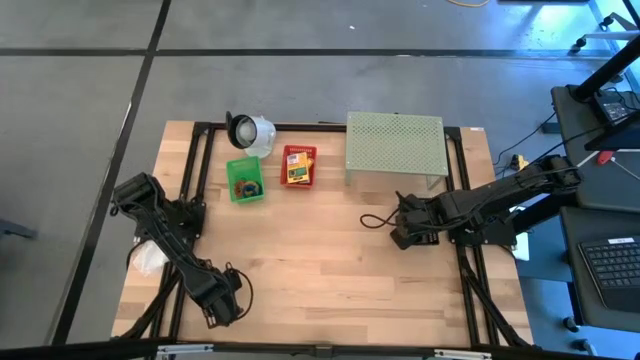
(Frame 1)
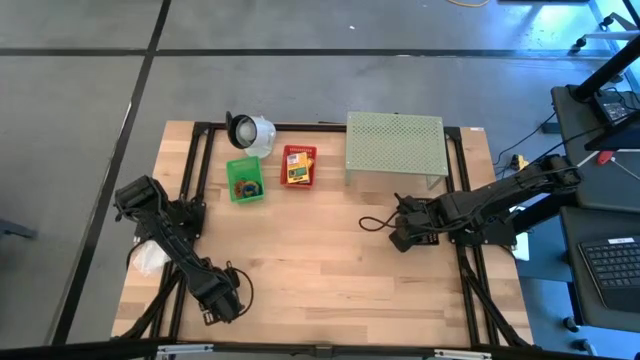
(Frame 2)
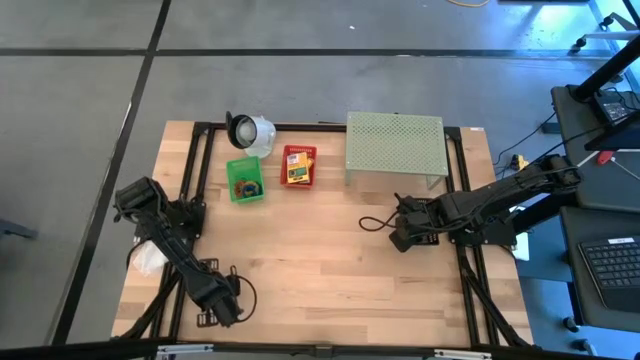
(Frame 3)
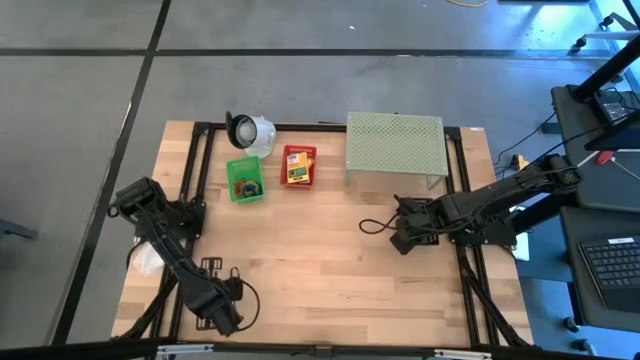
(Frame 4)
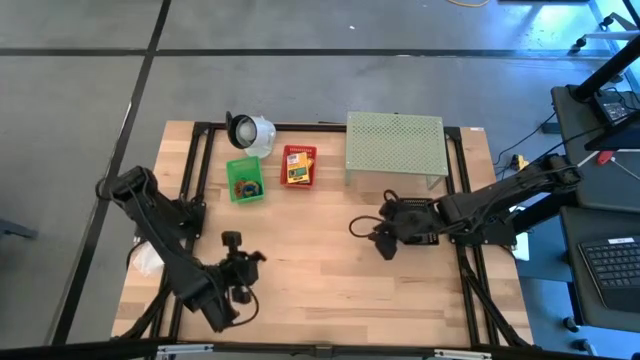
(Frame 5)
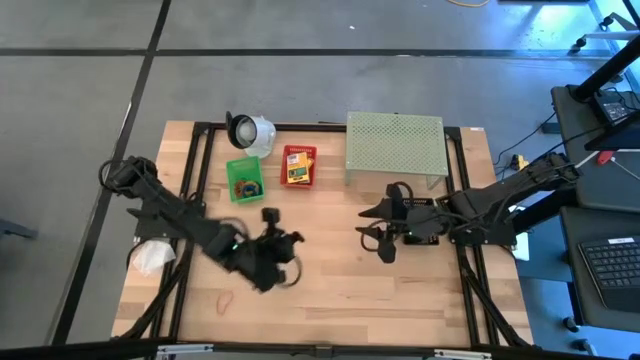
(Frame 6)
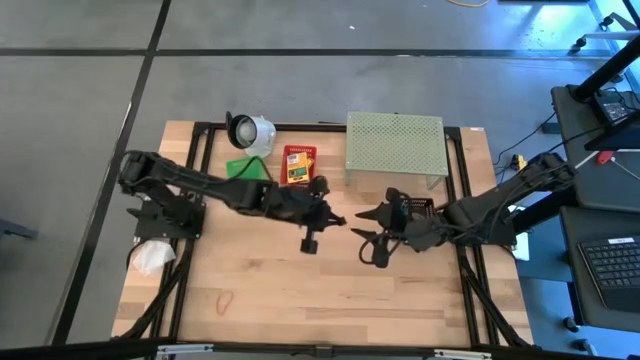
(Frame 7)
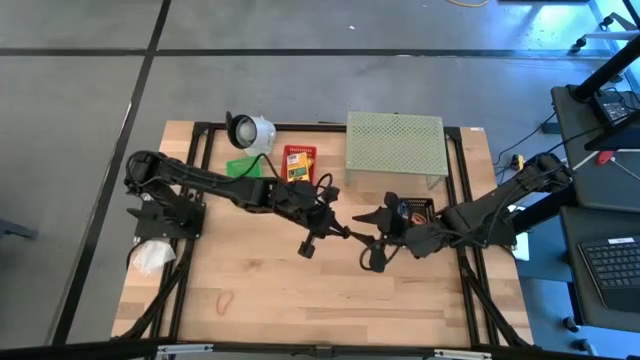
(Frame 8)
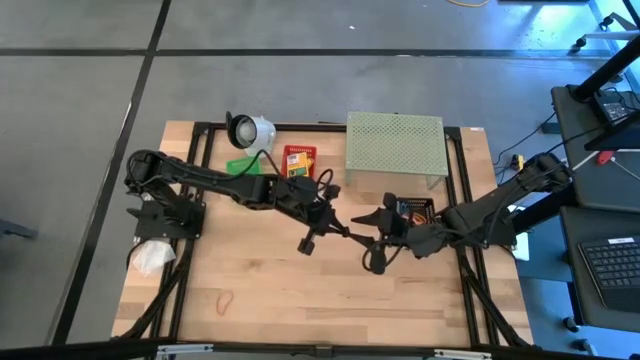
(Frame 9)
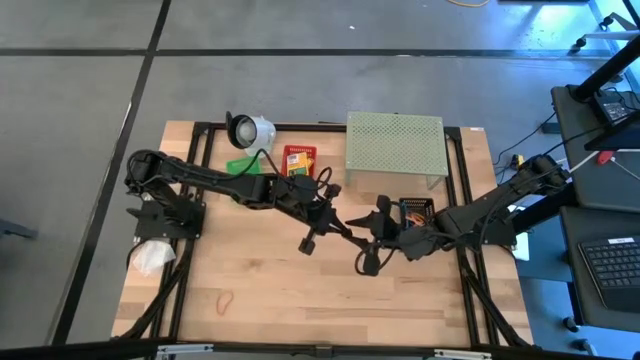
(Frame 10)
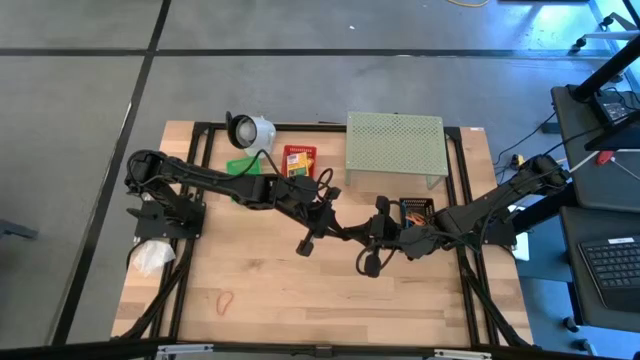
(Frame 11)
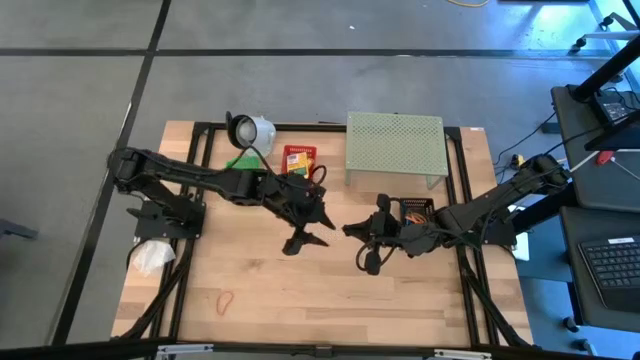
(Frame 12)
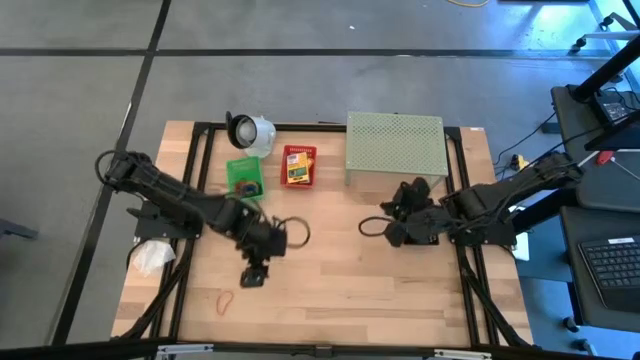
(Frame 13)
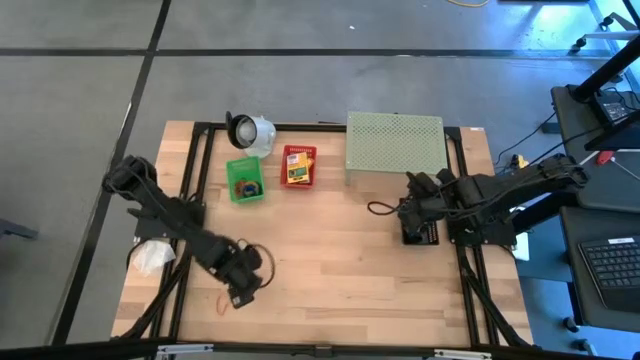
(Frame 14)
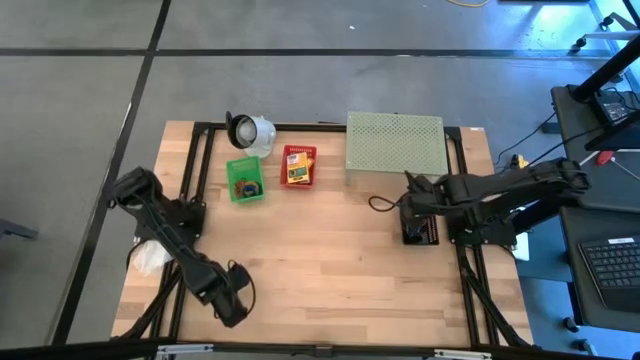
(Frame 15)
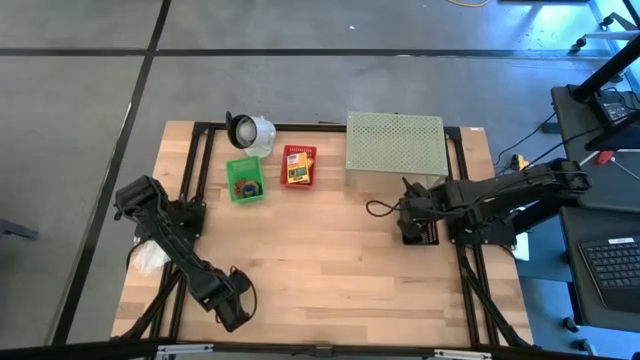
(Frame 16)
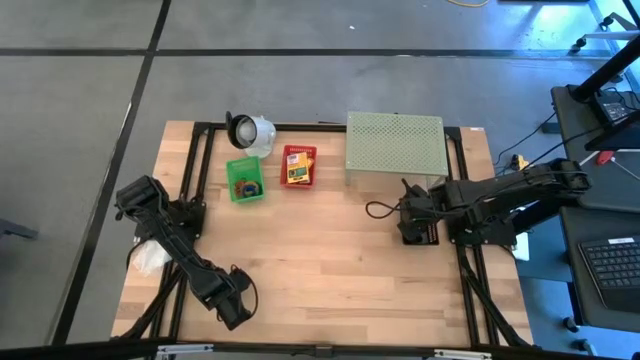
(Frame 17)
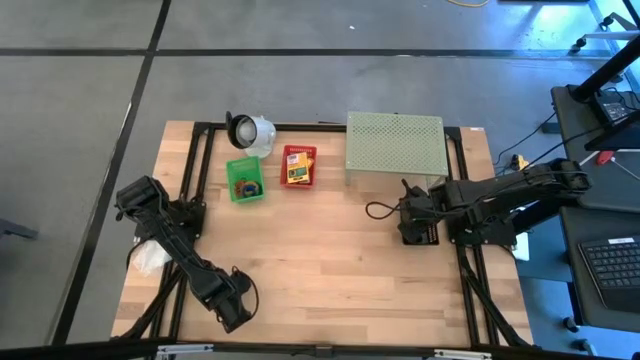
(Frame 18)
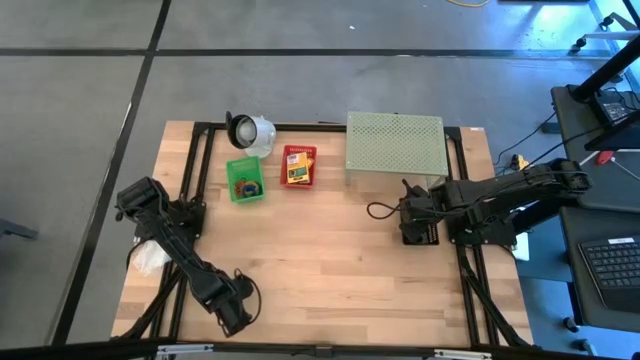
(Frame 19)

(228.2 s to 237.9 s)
Task: Pick & Place Office Desk Supplies
Put the black rubber band into the black basket

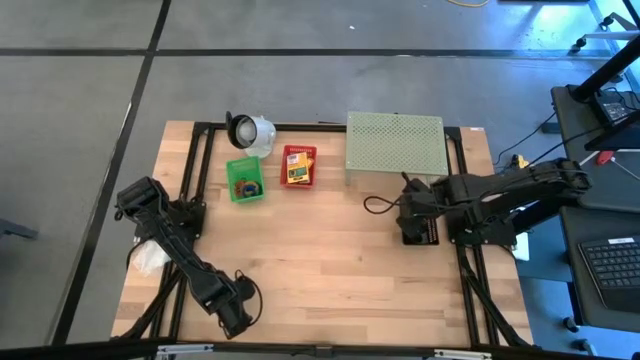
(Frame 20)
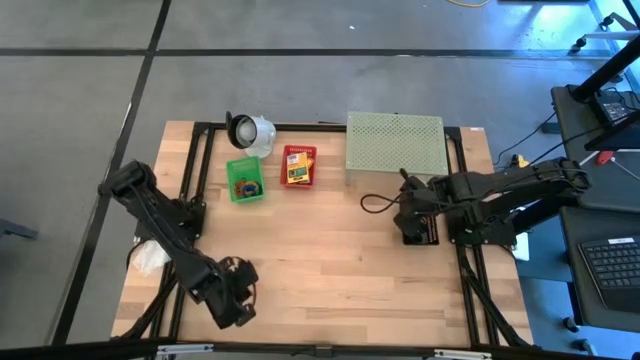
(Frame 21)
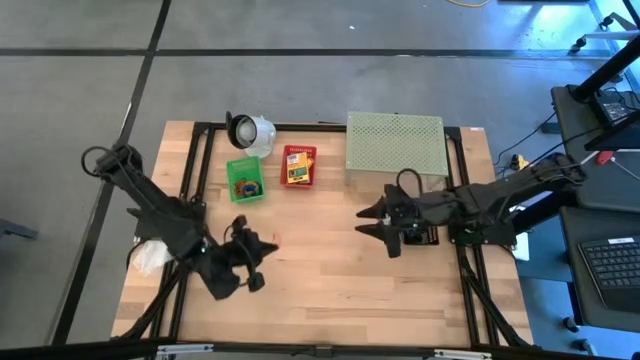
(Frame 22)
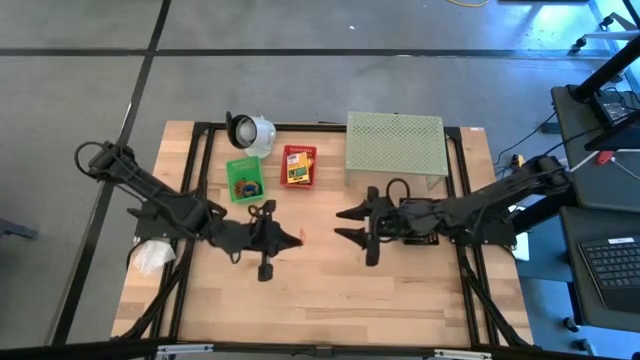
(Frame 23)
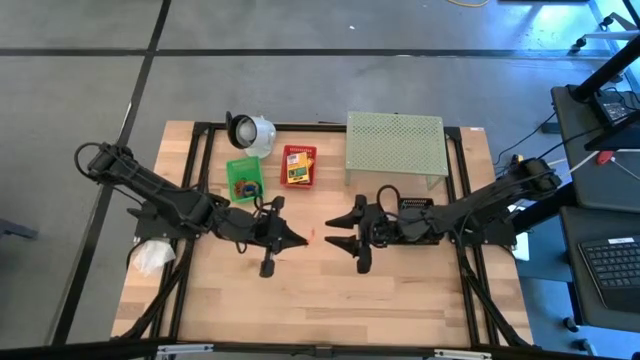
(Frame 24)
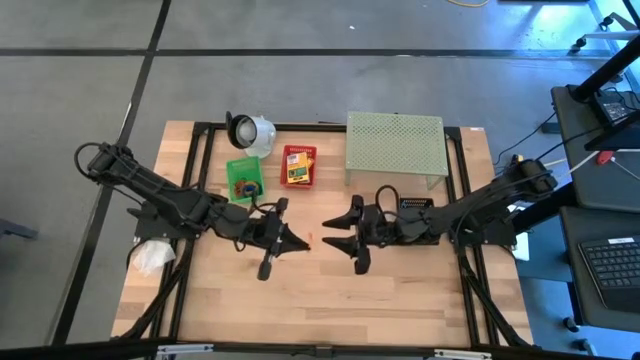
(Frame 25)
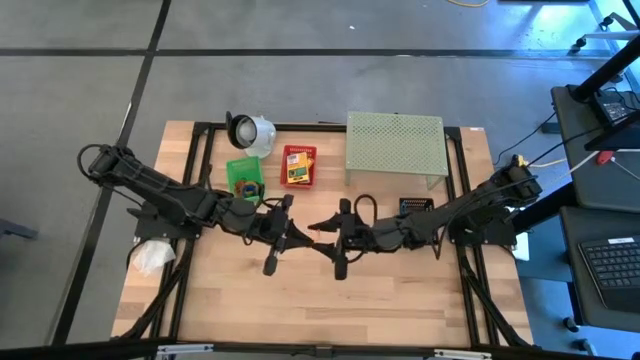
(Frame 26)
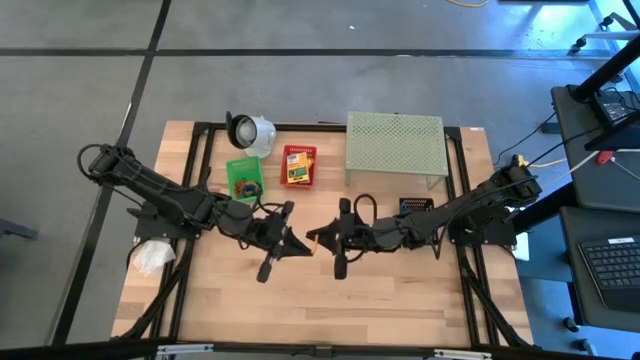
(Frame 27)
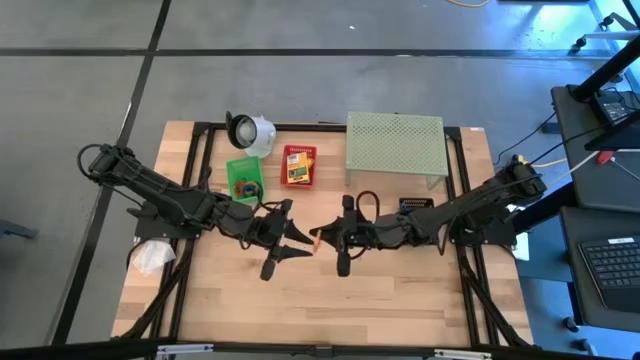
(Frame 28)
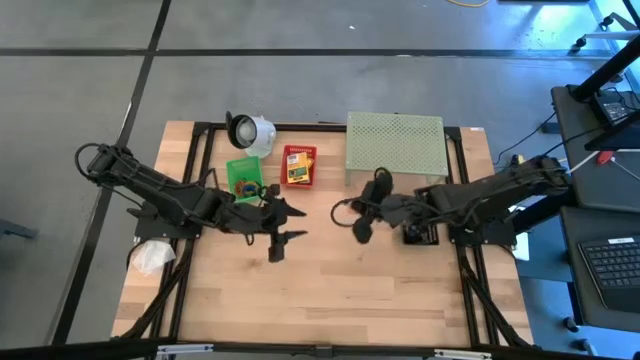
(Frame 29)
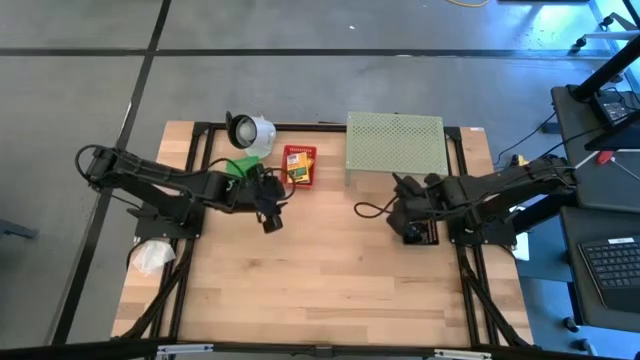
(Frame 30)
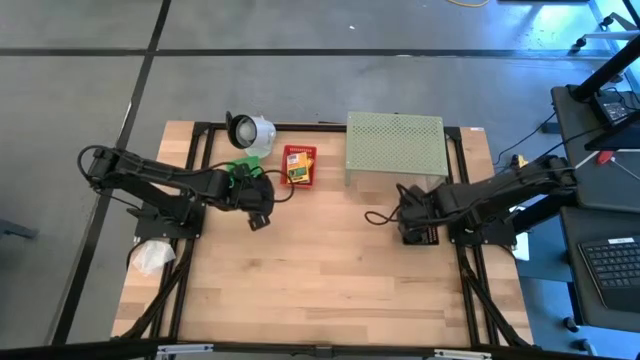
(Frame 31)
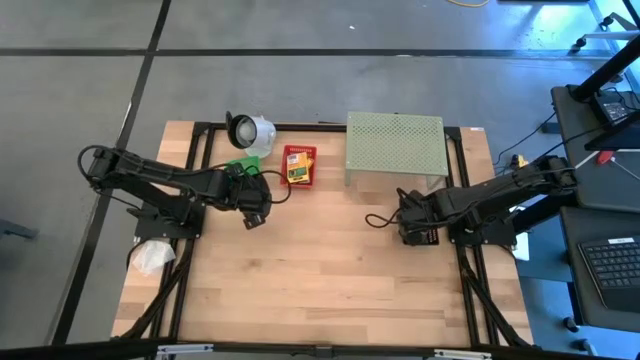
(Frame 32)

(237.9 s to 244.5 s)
Put the orange rubber band into the black basket

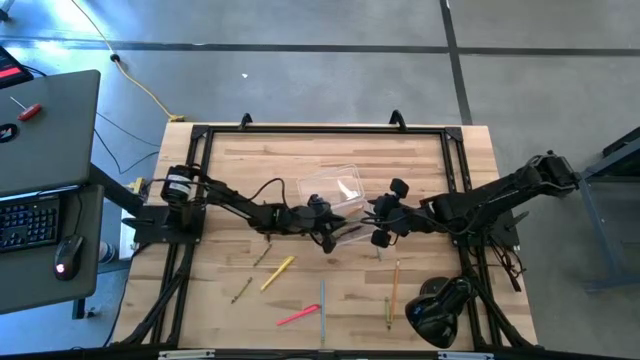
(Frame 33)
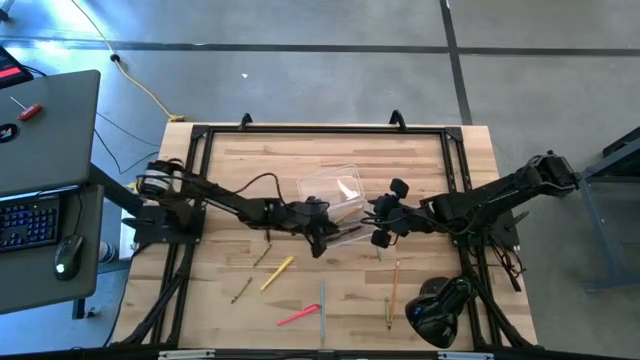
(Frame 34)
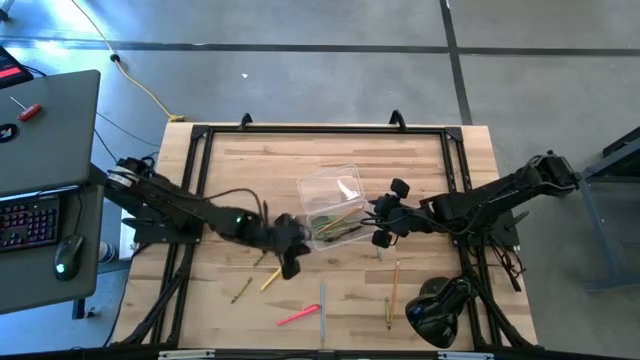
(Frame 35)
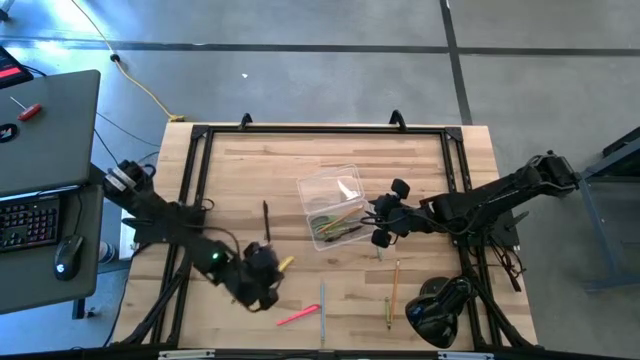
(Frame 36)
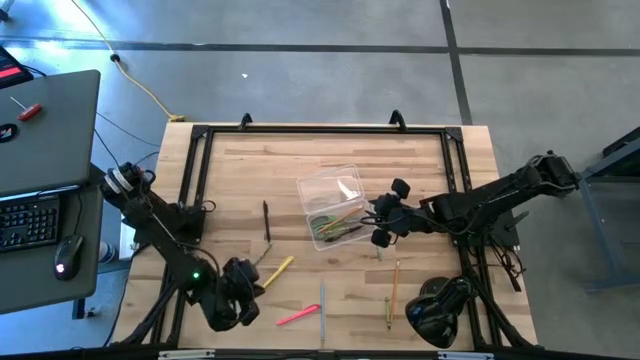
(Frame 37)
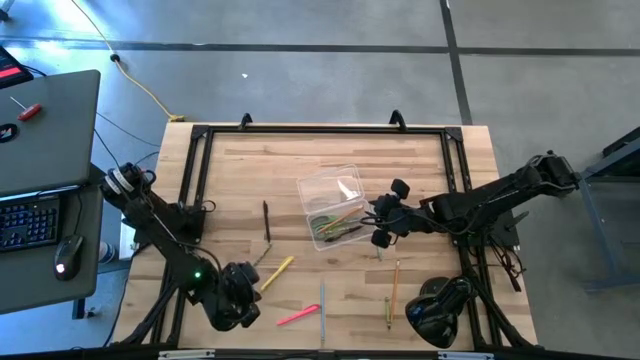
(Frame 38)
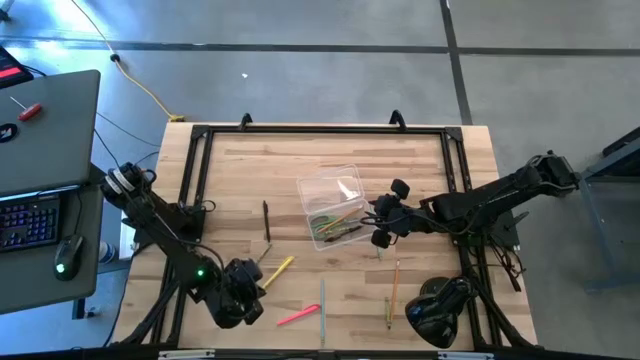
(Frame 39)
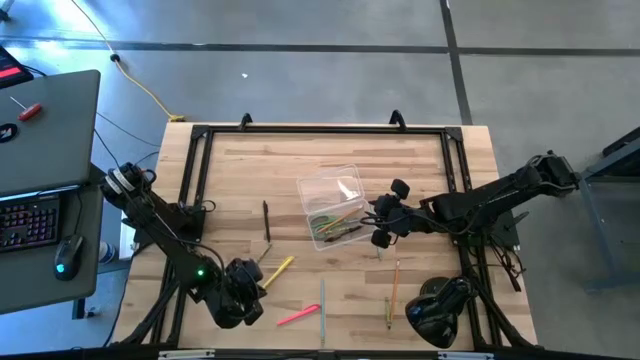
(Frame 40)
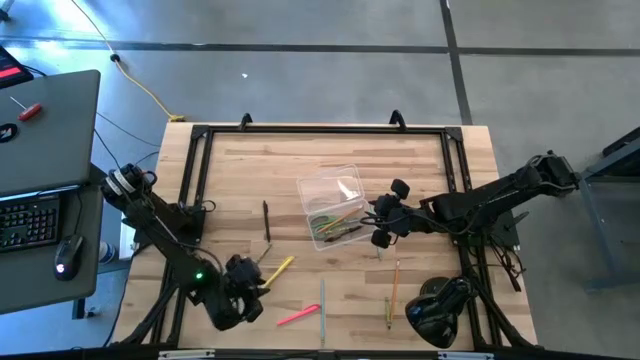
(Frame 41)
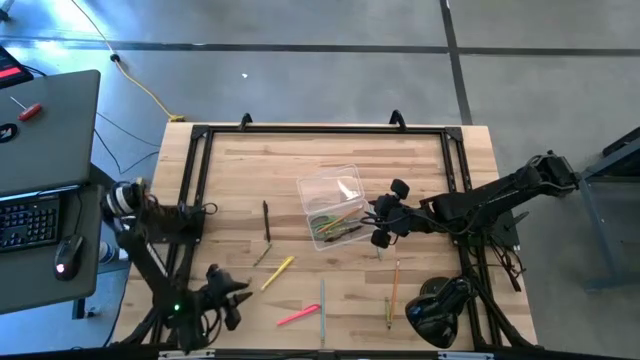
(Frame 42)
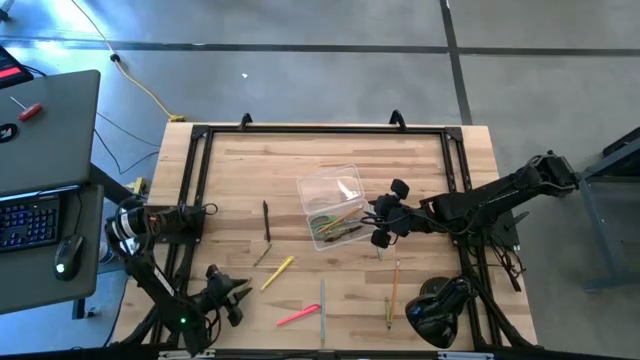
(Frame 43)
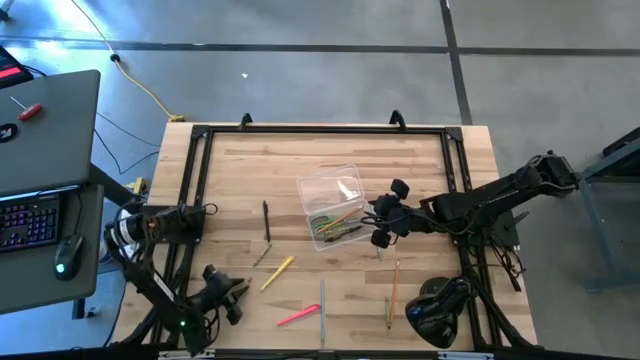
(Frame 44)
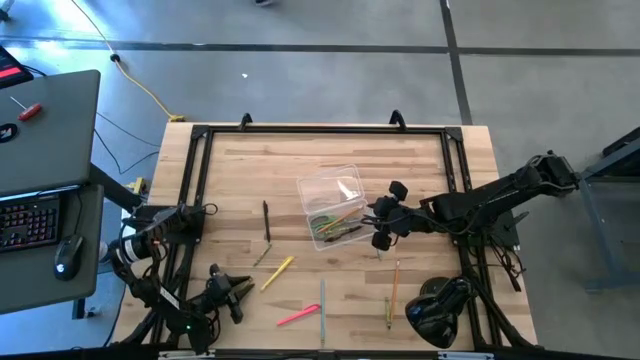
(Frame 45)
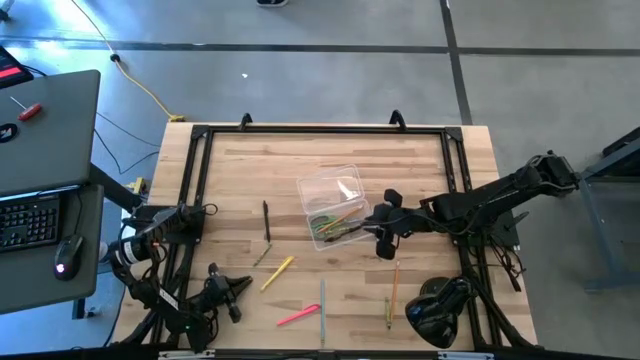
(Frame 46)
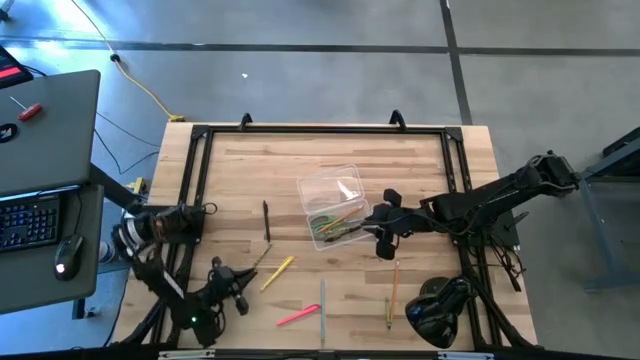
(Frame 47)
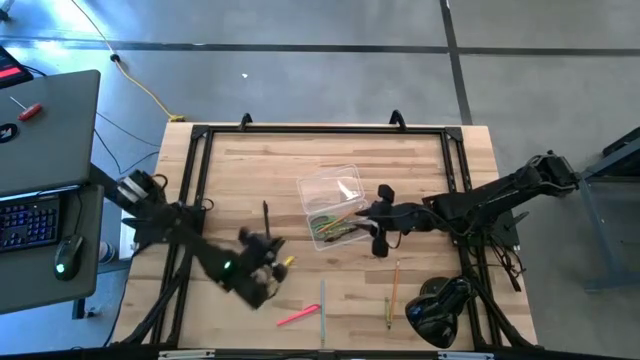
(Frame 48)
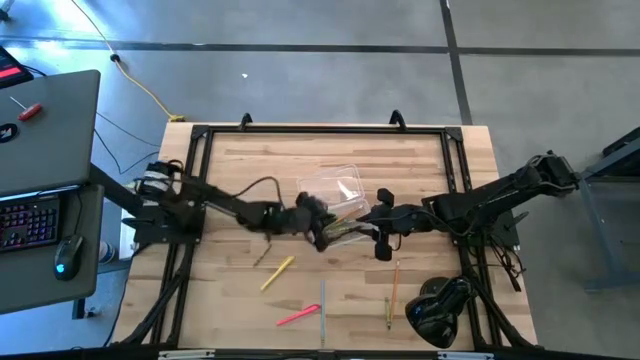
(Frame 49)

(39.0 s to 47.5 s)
Task: Pick & place school supplies into a supply box
Put the green crayon into the supply box
